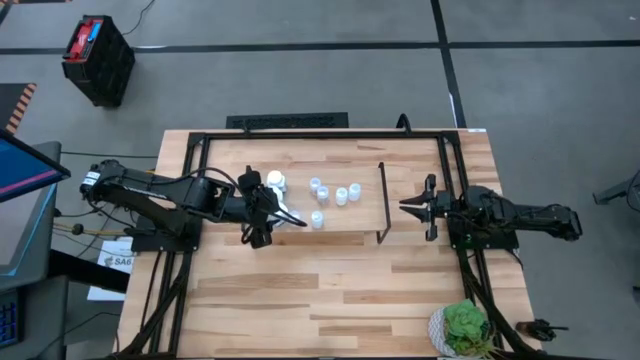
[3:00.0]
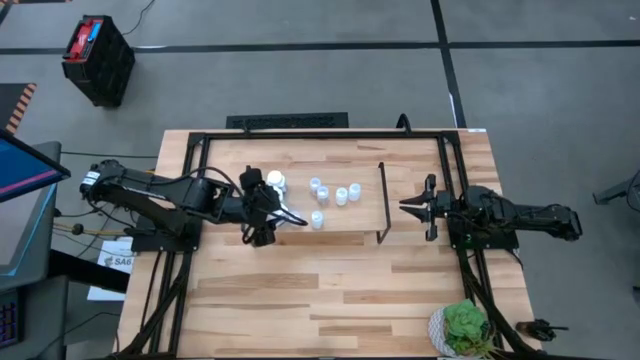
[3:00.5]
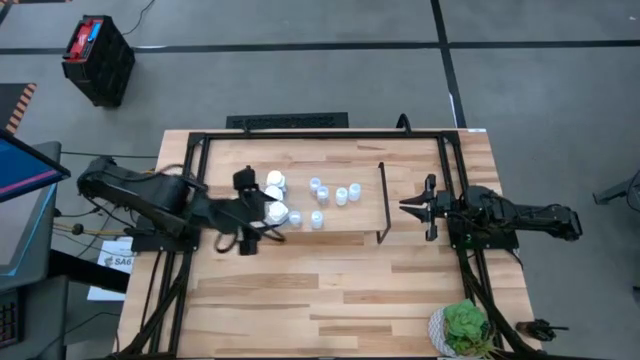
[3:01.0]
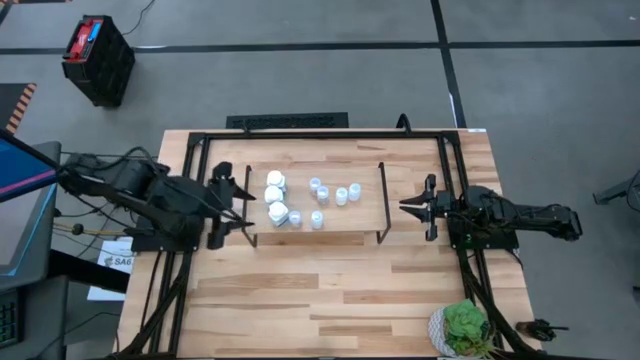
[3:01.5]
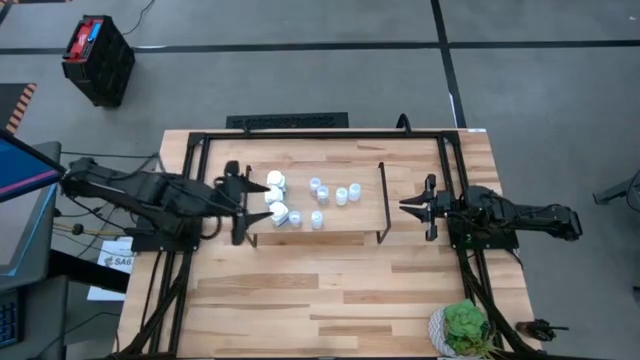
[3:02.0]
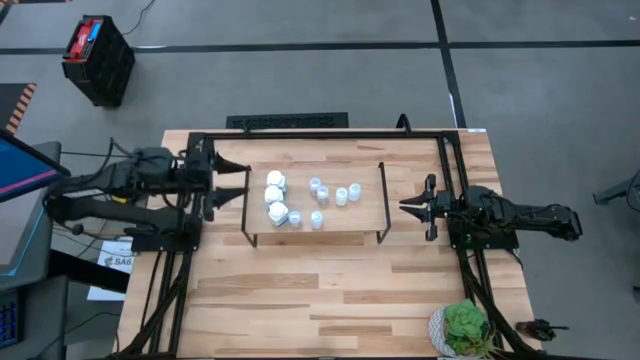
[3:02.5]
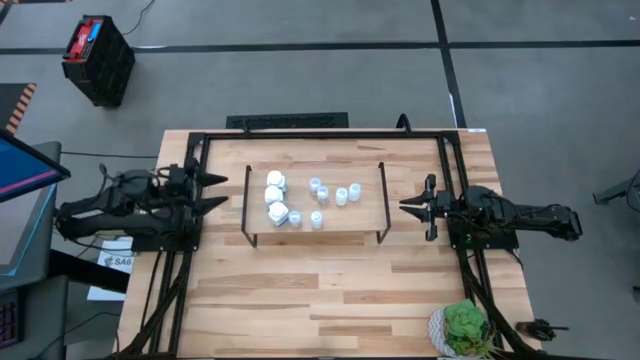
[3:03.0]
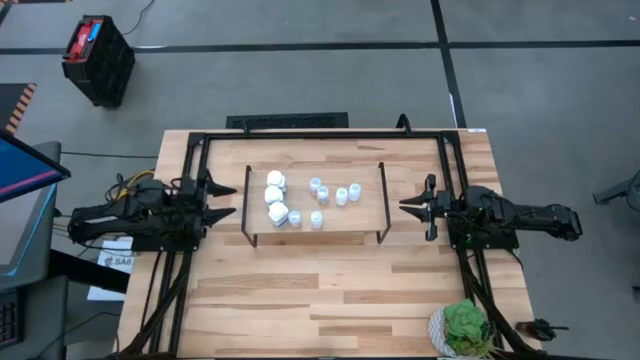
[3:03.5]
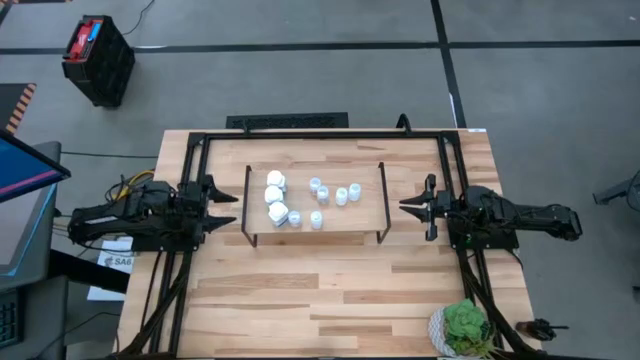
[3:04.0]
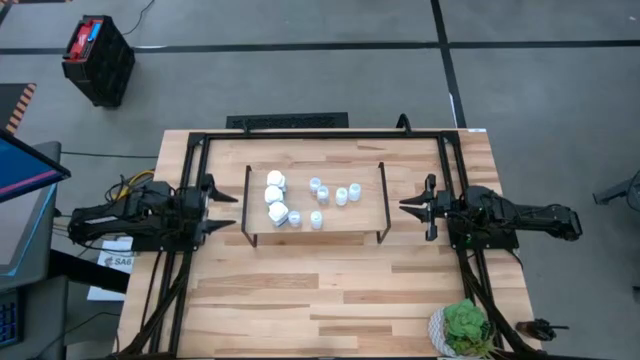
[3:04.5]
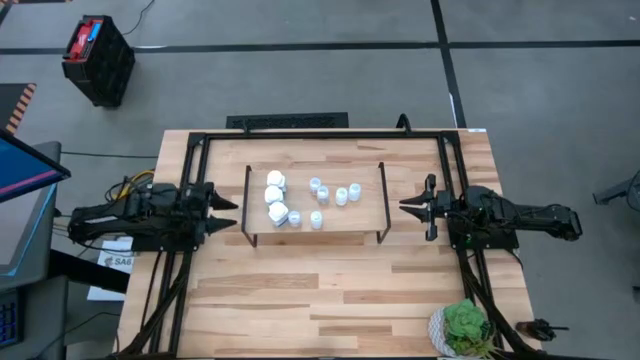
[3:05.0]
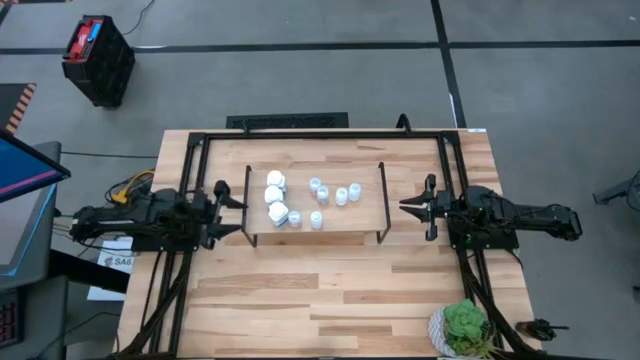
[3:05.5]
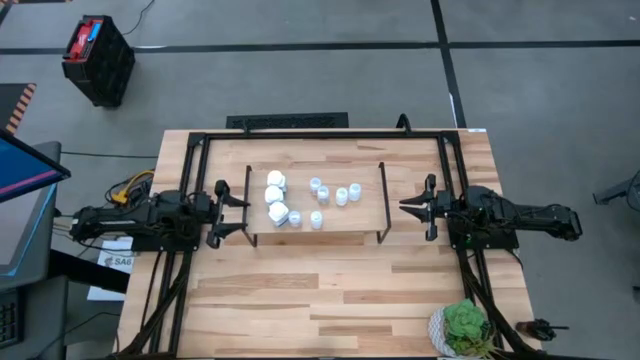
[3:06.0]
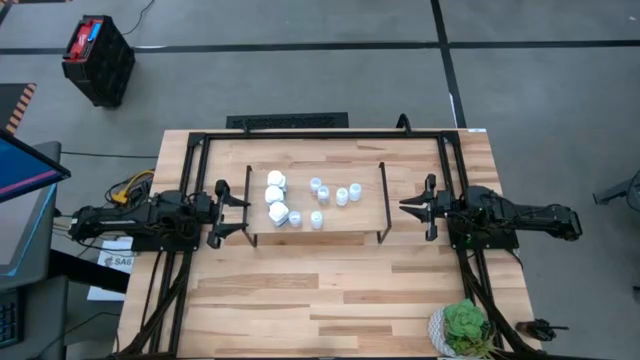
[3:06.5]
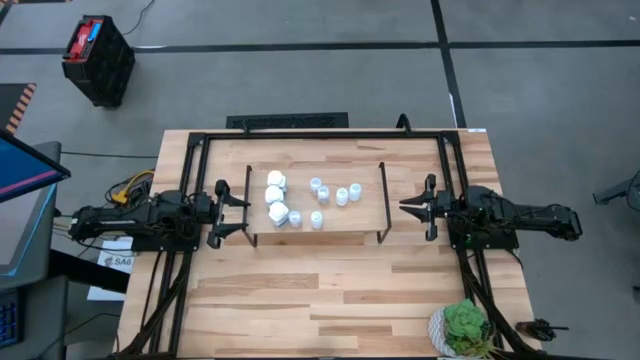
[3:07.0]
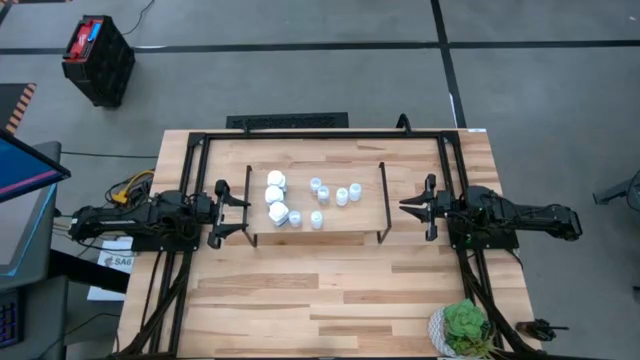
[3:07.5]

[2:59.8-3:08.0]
Task: Pick and place medicine bottles onto shelf by color
Return to Home Position

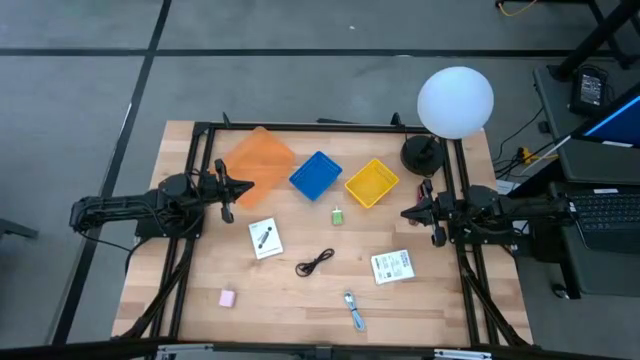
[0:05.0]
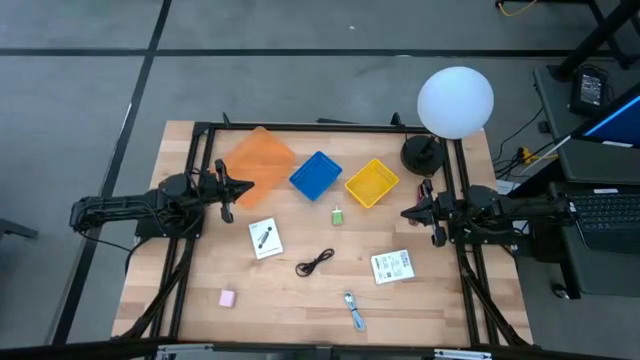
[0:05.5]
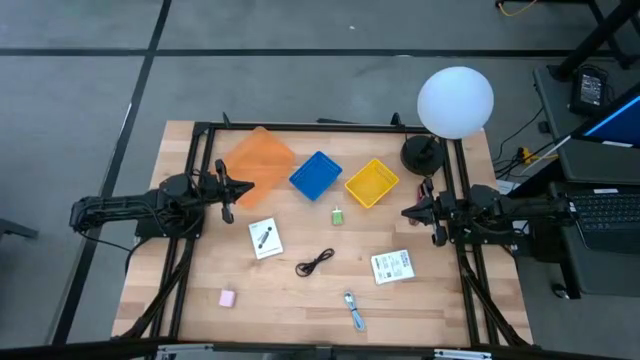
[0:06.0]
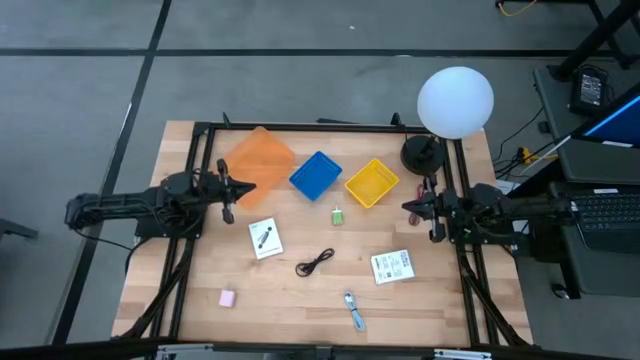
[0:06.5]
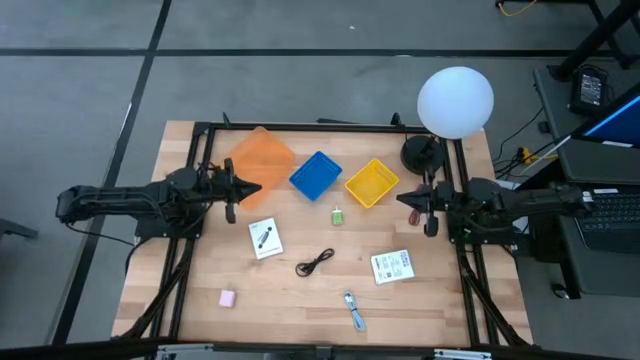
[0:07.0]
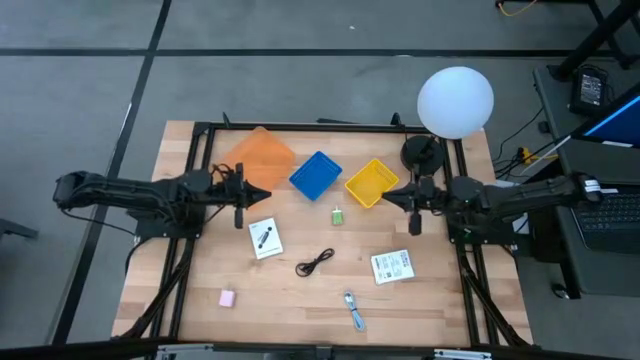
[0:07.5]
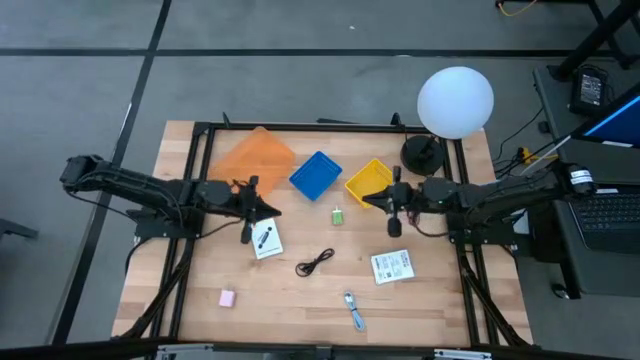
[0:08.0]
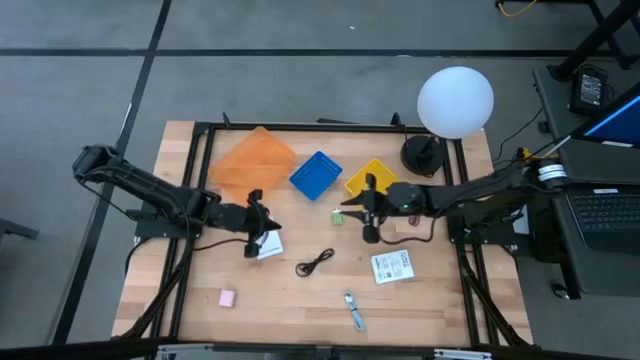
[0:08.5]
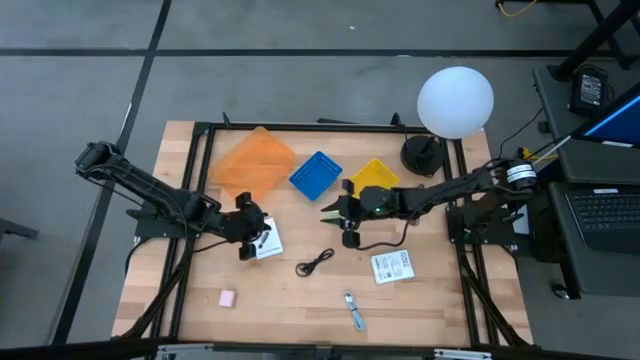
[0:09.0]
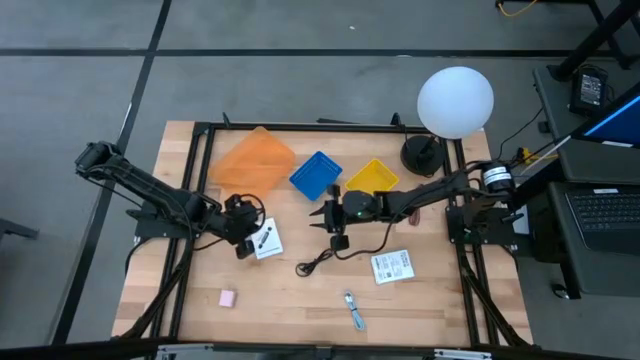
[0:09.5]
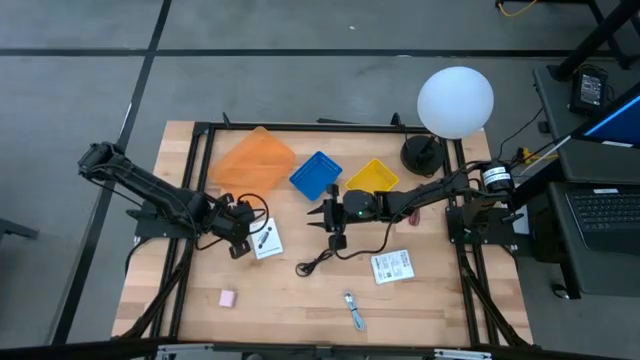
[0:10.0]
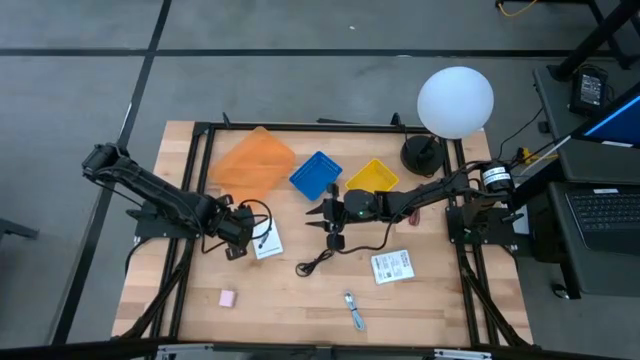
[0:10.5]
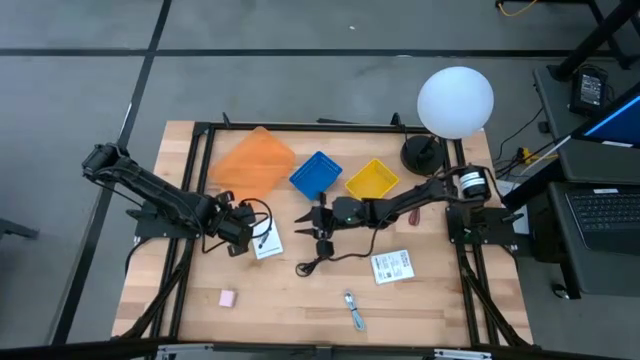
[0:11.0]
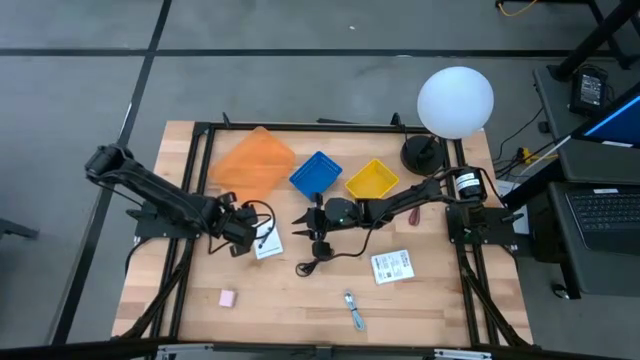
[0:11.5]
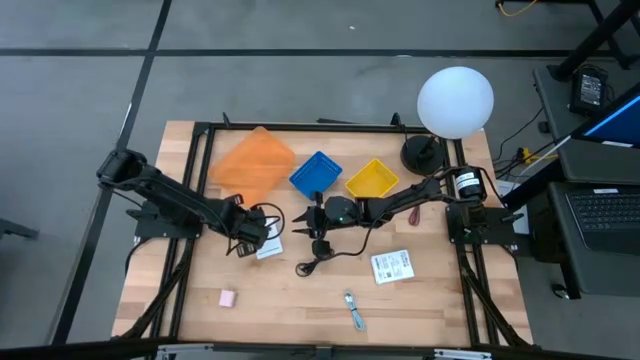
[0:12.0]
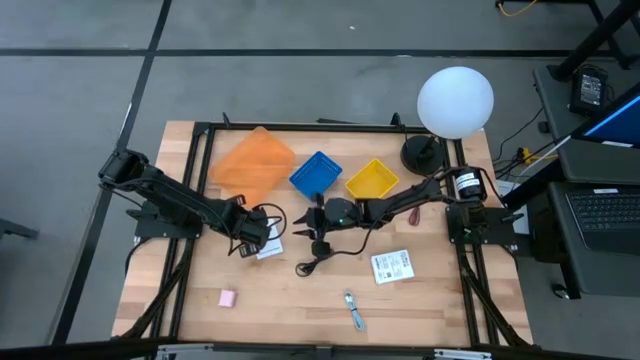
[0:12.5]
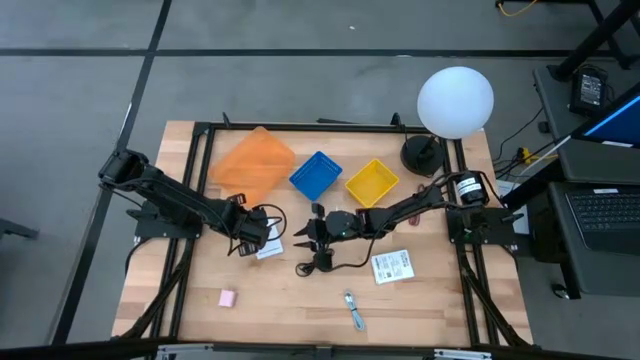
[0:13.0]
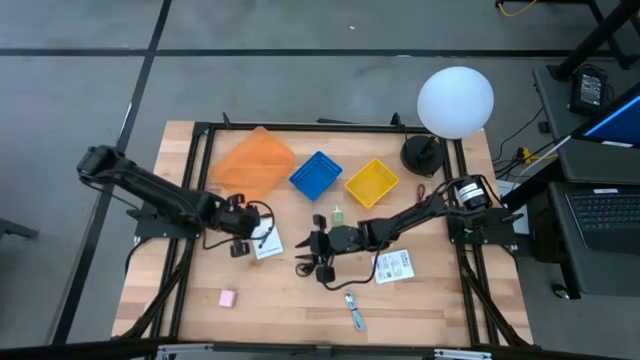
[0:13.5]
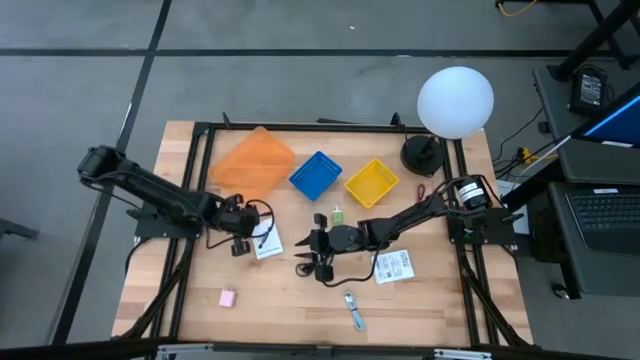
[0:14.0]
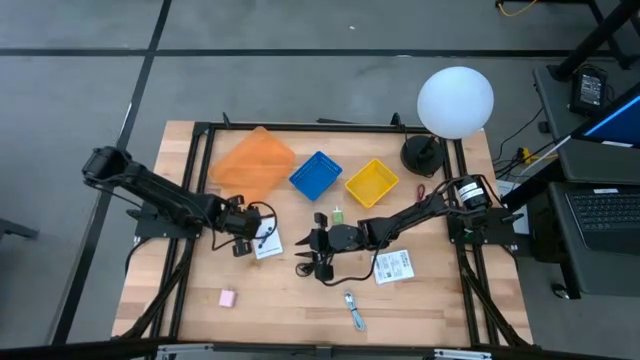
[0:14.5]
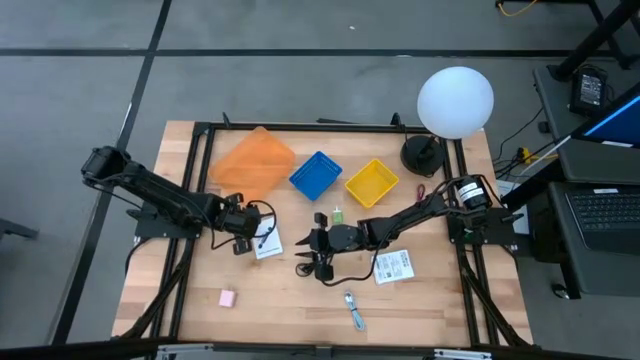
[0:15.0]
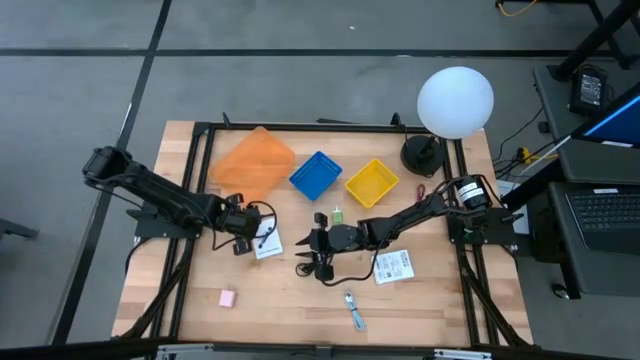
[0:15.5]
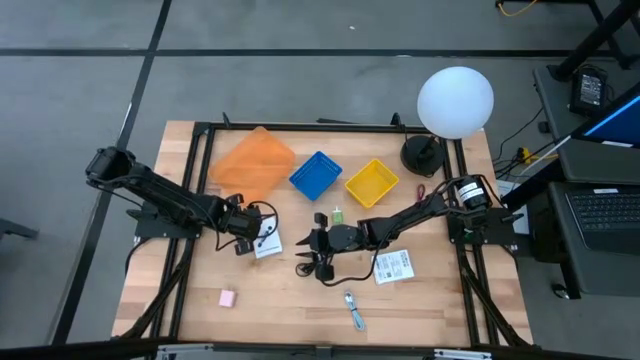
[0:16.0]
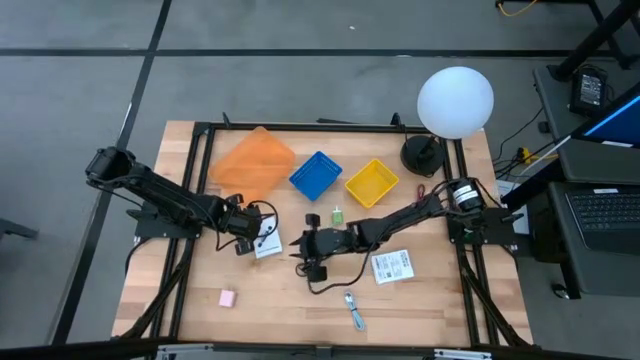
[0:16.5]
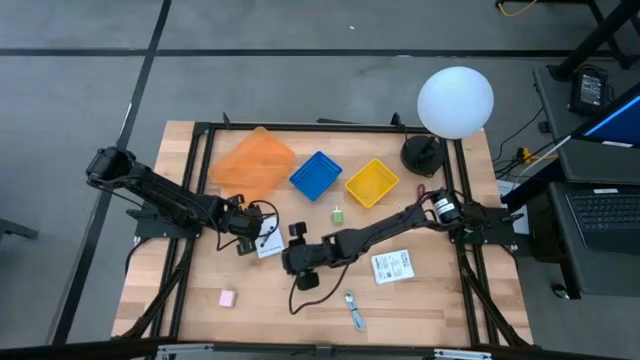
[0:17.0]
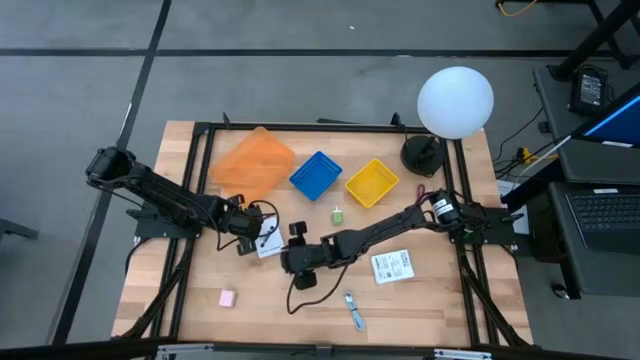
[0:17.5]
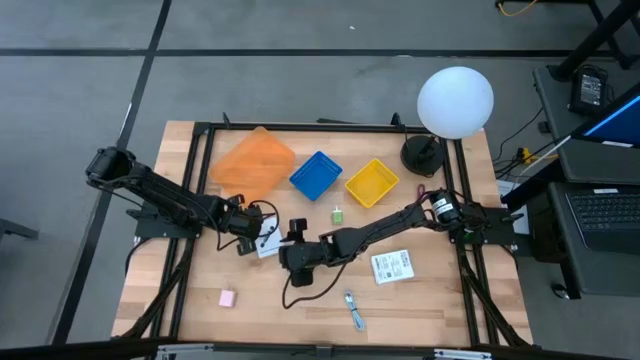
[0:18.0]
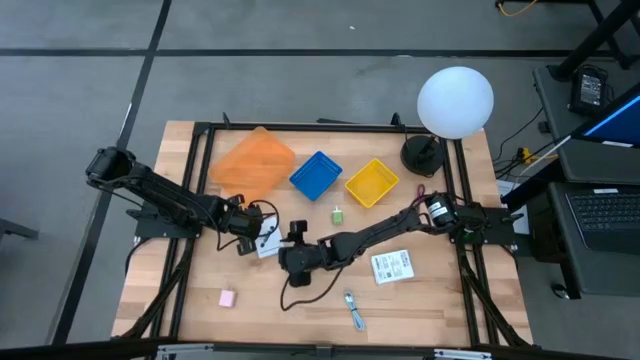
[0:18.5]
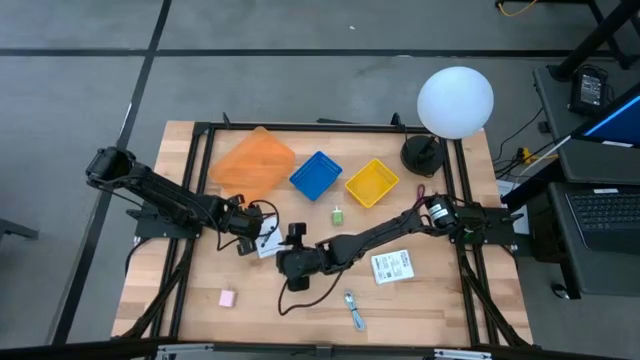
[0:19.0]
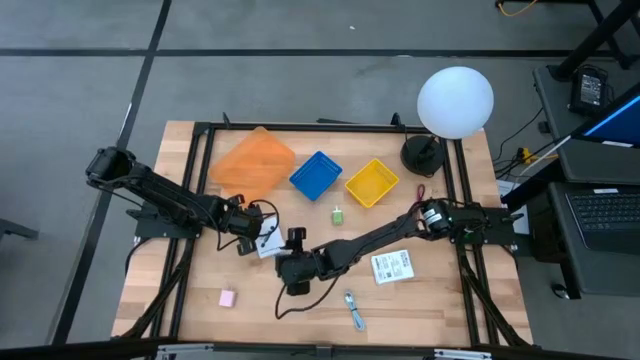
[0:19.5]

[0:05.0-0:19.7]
Task: Pick and place items into bin
Put the left white card reader box into the yellow bin
